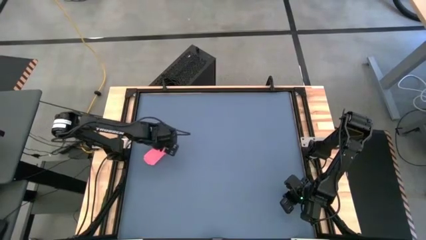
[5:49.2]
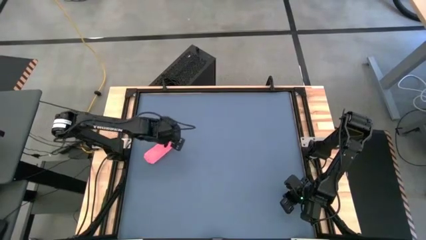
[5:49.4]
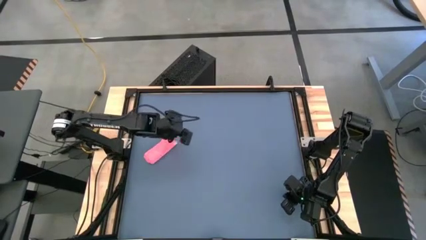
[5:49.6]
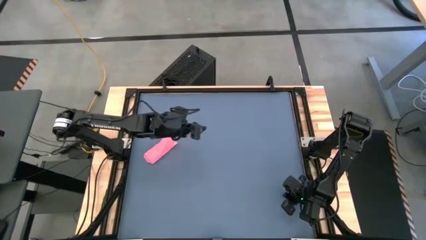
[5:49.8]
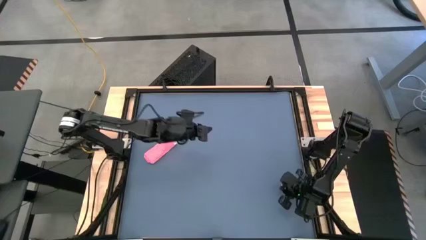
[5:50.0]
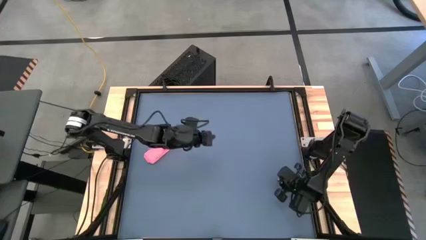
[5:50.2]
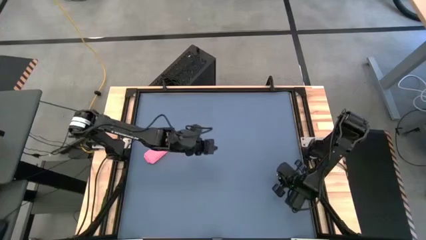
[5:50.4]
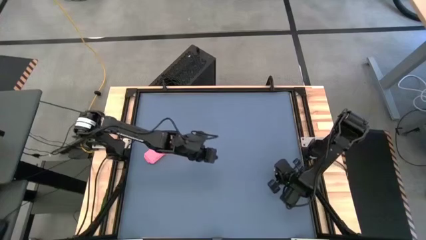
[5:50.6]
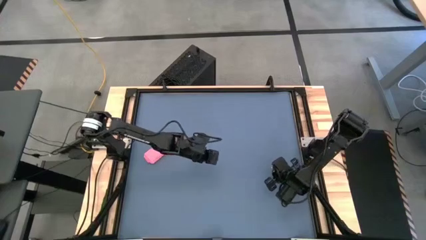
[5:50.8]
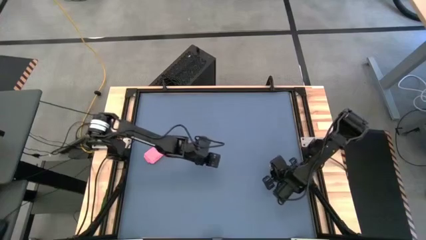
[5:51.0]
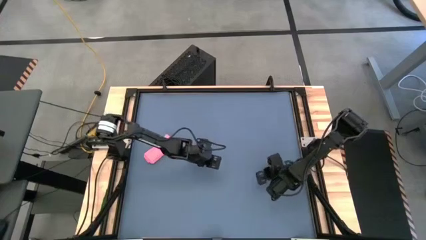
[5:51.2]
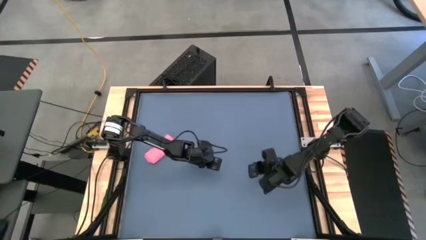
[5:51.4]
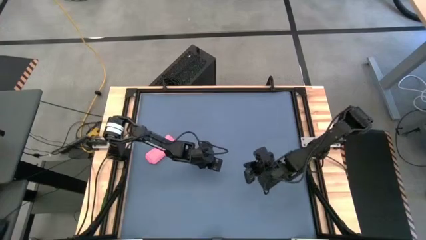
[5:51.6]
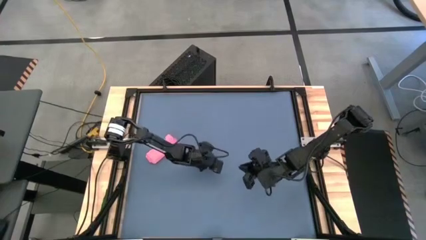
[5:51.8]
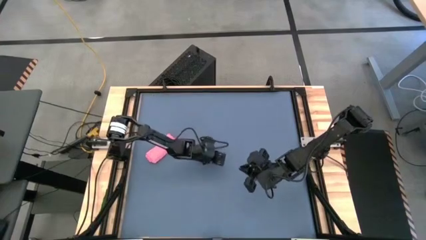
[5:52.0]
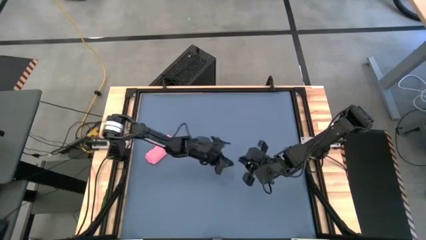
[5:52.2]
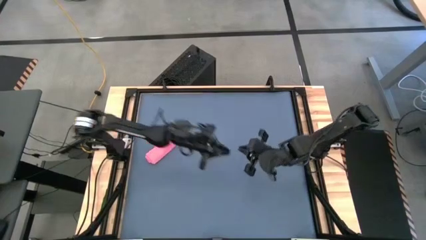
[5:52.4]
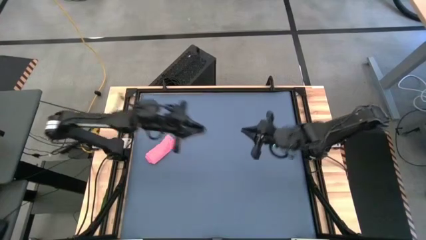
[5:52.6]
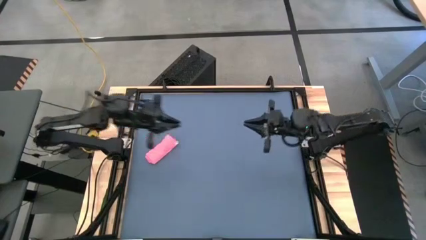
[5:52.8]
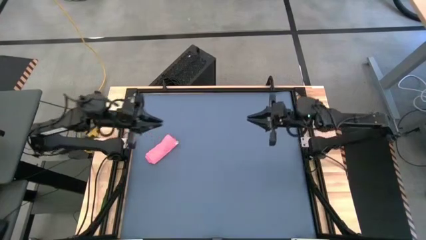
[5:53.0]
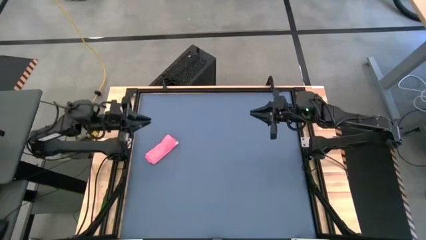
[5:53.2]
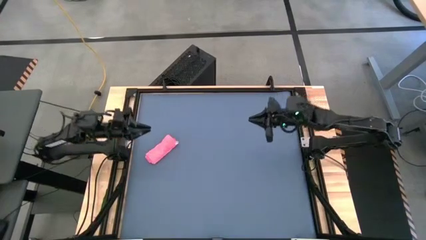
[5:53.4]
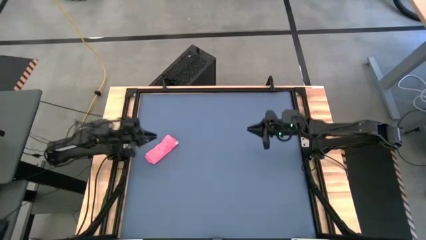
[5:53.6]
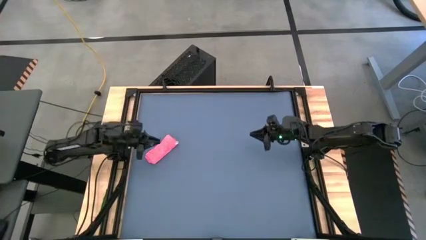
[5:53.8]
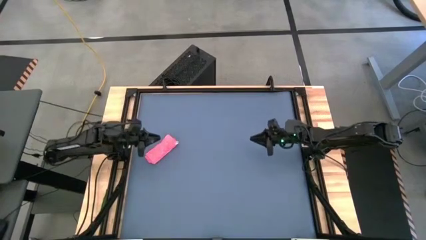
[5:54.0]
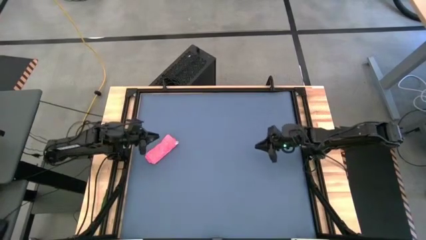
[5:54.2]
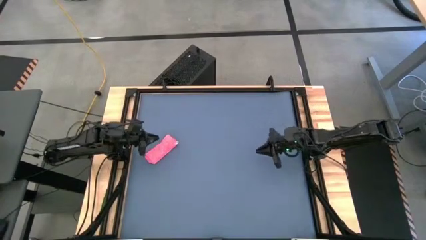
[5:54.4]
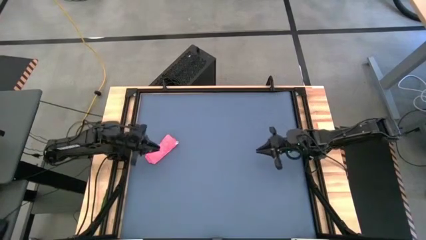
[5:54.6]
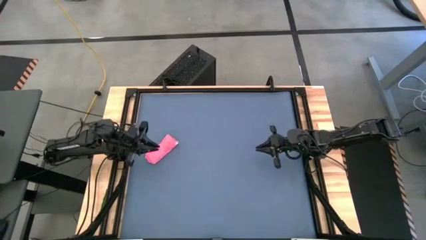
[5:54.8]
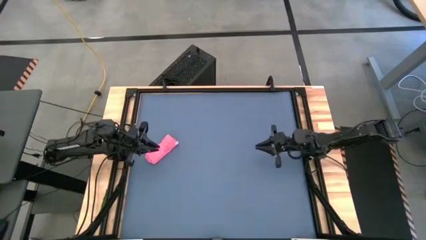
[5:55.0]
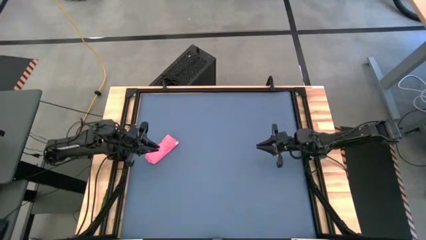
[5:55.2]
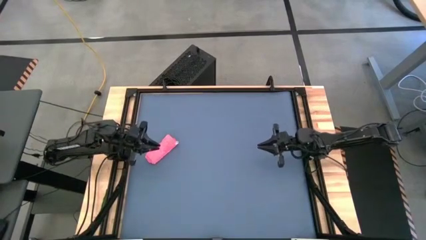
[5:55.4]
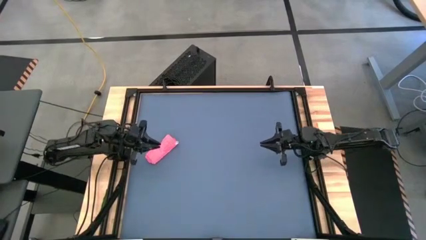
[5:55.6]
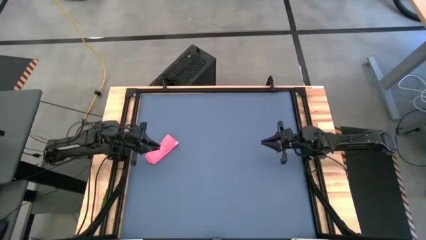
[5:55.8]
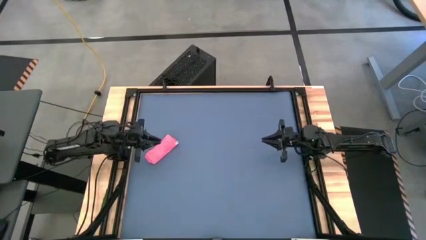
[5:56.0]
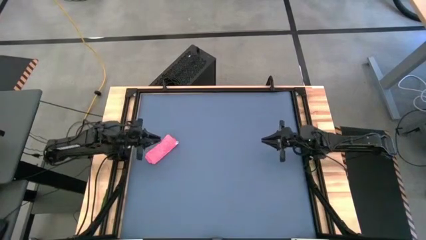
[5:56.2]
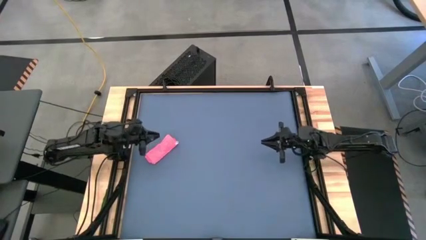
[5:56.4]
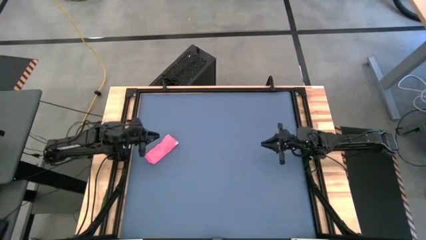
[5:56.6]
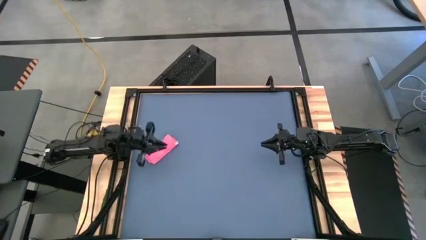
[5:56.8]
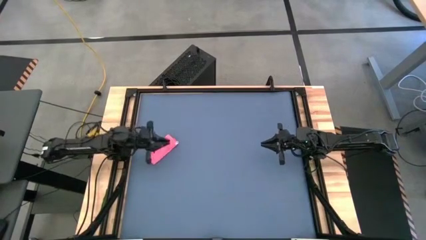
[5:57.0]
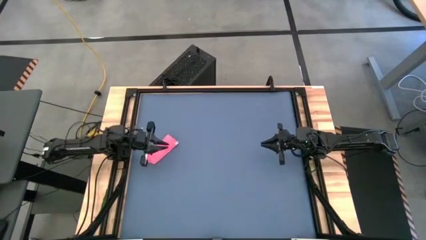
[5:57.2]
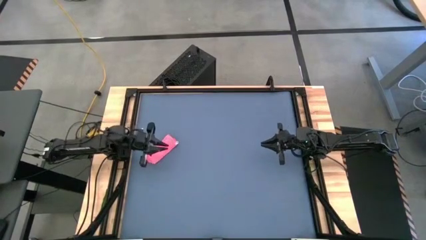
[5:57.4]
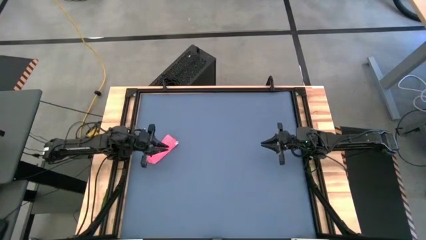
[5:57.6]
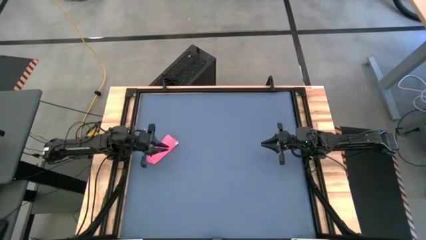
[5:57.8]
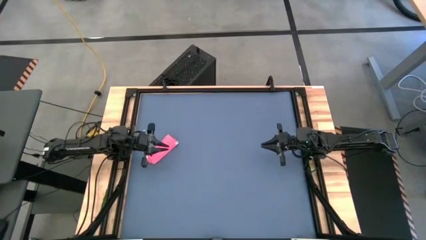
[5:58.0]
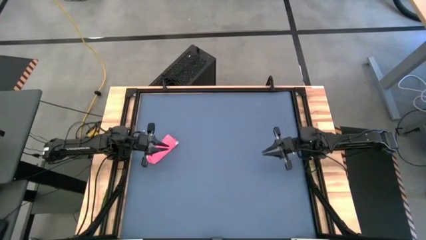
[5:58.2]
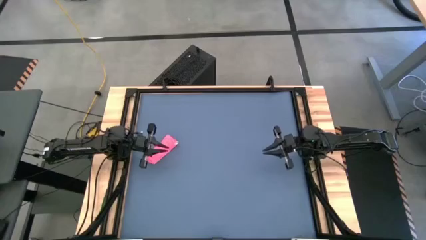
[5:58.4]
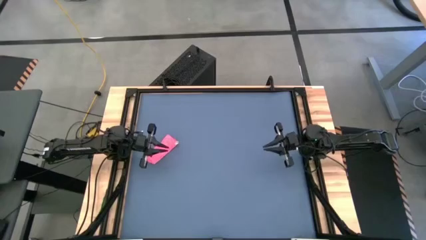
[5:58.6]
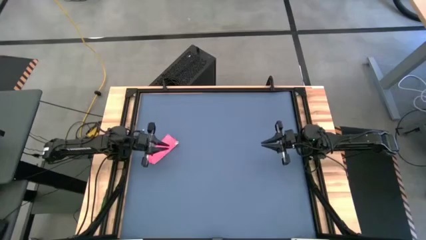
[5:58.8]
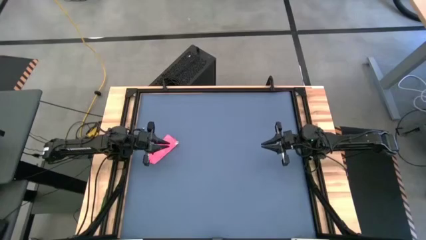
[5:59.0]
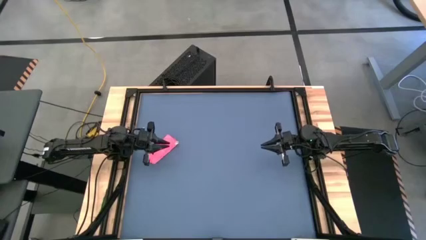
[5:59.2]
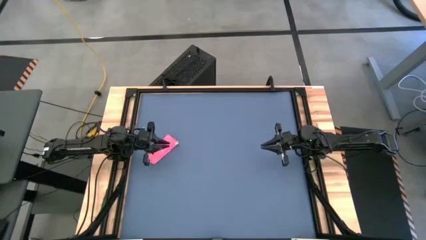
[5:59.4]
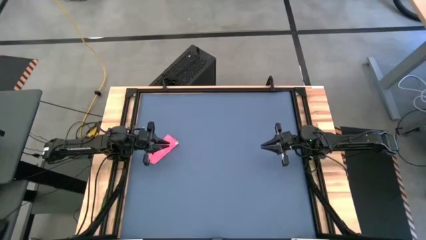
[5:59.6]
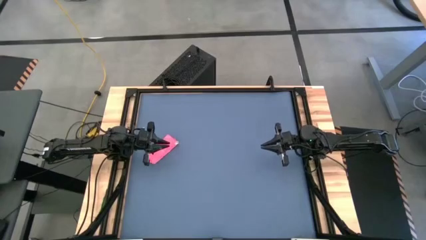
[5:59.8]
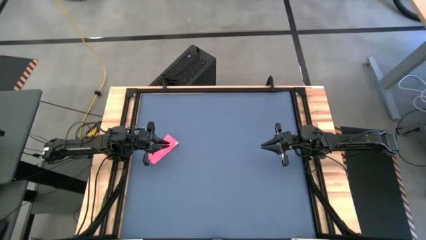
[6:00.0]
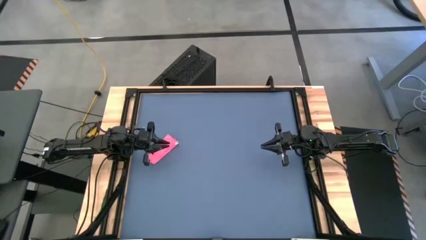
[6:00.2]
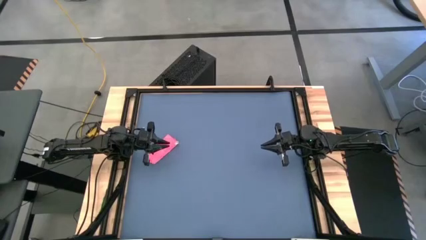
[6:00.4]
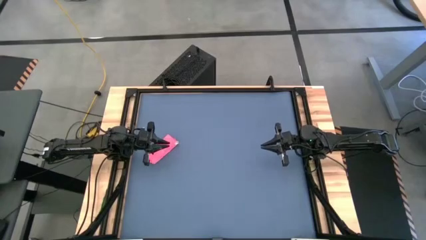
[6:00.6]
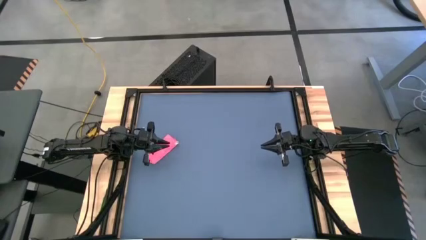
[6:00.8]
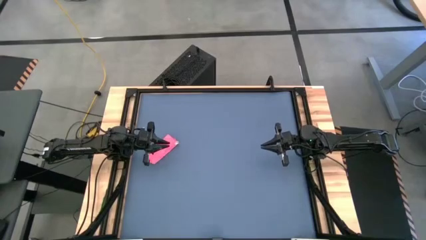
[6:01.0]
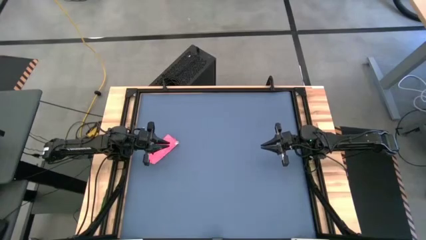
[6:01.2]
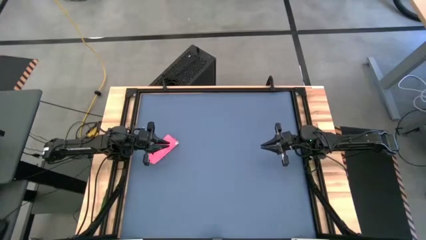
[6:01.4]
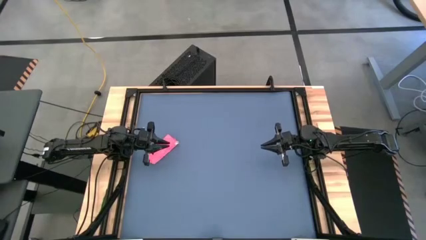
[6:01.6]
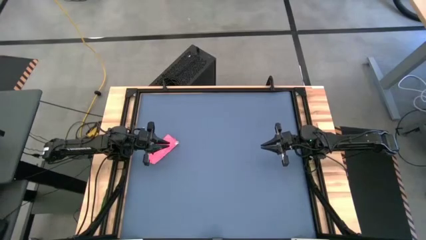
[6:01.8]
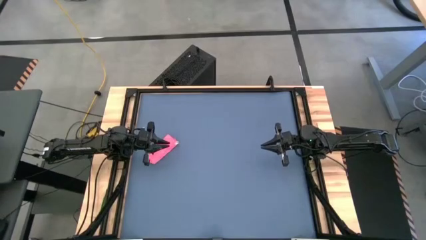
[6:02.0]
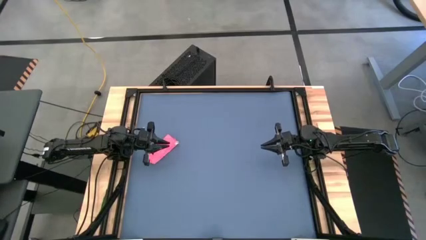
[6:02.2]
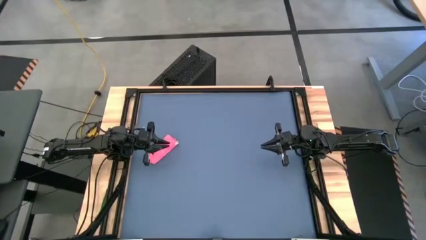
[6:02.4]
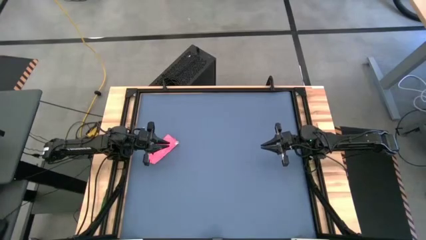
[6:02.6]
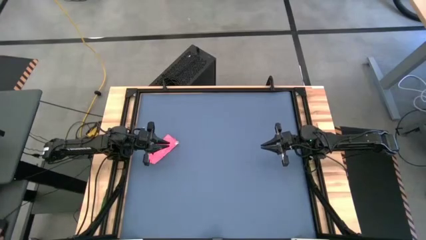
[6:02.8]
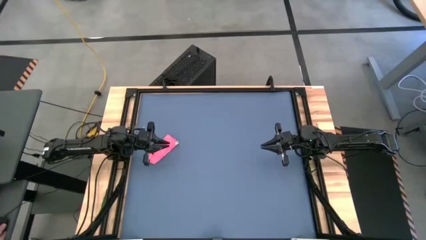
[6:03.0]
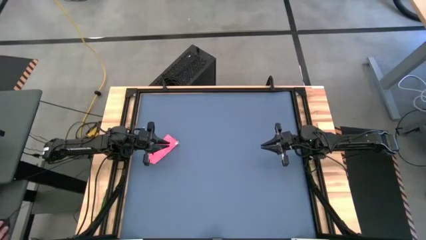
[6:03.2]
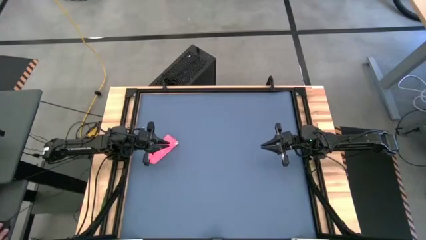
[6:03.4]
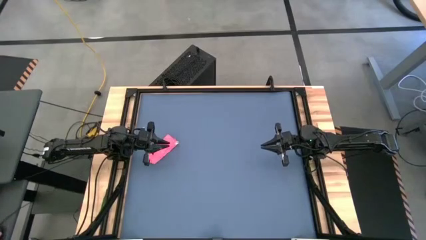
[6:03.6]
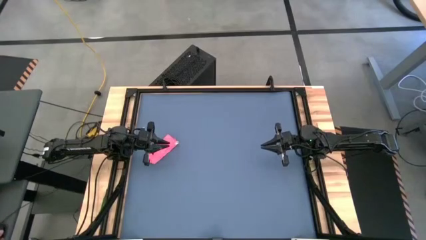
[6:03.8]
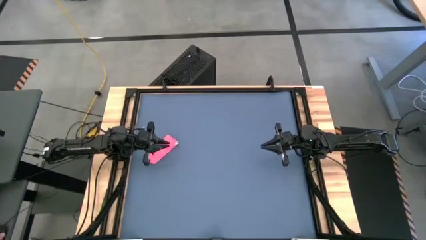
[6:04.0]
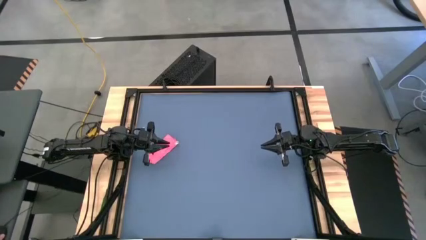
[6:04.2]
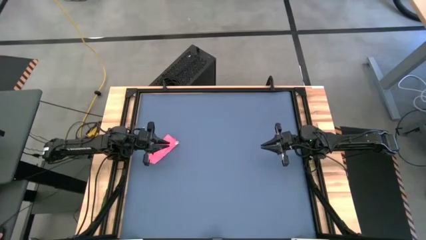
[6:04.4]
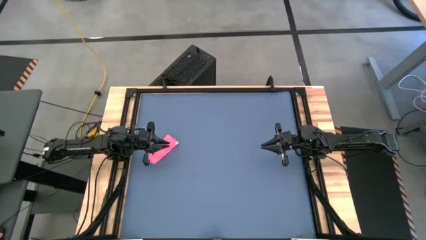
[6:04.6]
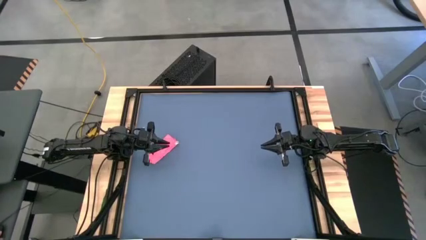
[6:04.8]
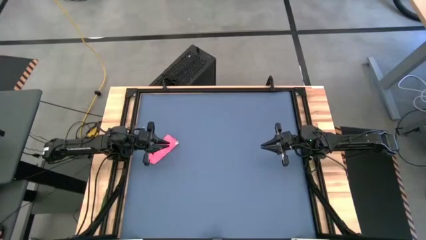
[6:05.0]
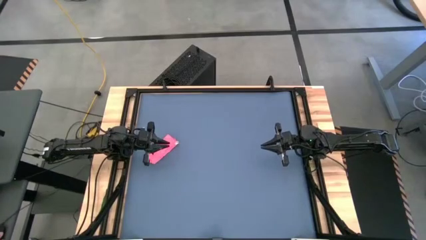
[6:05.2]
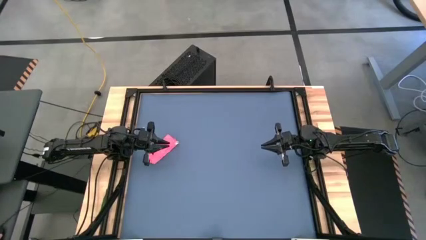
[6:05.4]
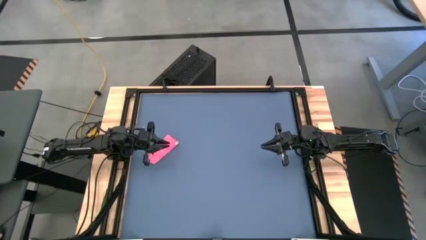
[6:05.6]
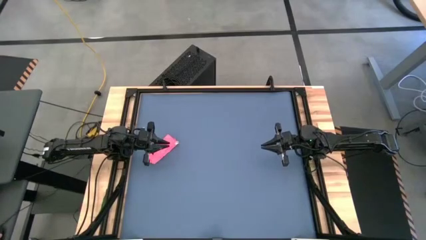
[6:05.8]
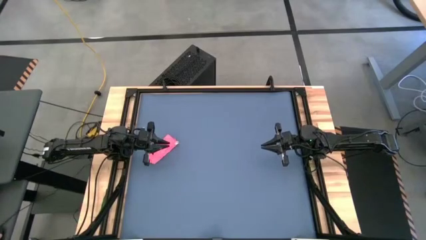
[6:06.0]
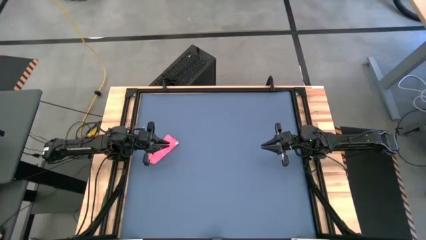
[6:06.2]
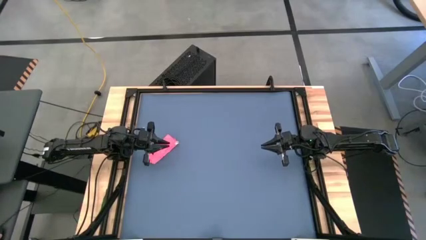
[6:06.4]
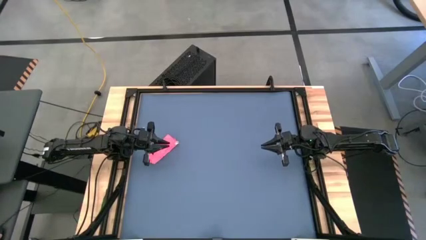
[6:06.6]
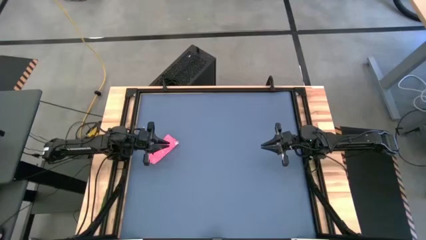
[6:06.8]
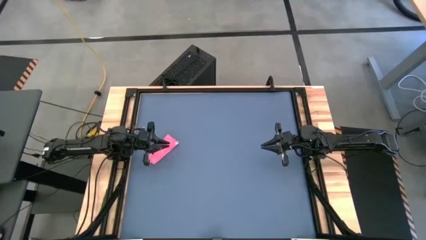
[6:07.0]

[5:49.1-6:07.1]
Task: Roll towel
Return to Home Position
